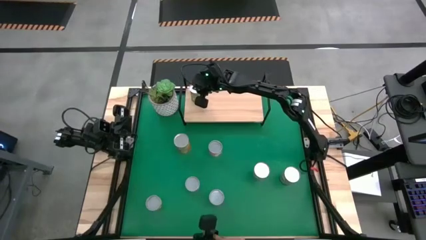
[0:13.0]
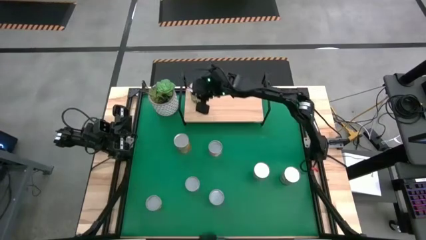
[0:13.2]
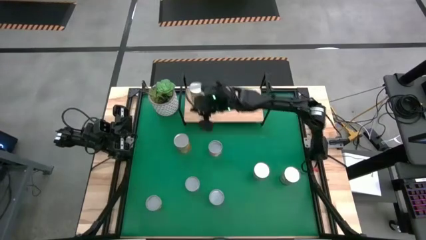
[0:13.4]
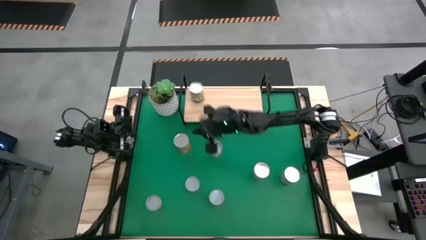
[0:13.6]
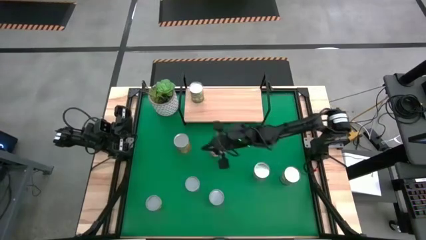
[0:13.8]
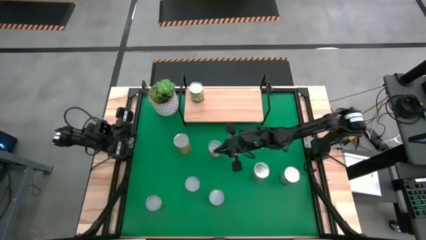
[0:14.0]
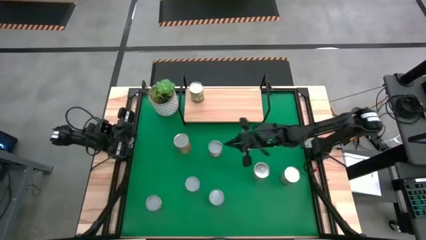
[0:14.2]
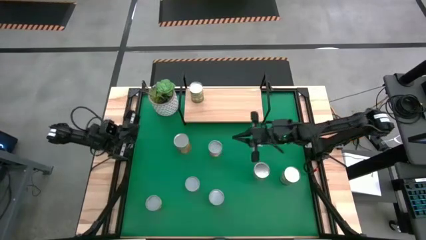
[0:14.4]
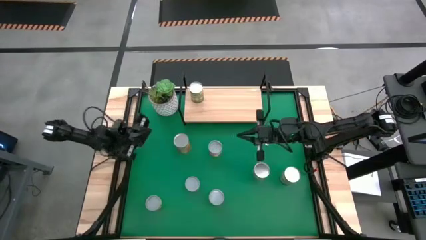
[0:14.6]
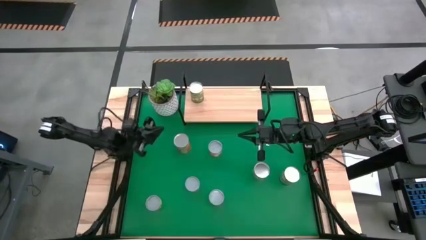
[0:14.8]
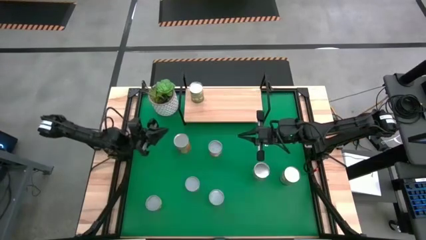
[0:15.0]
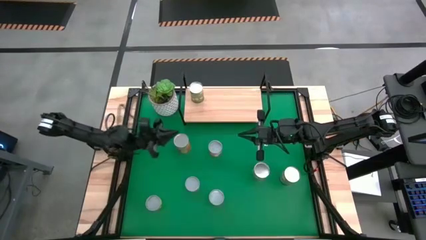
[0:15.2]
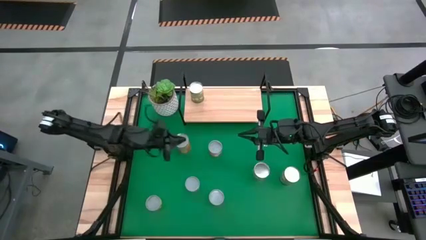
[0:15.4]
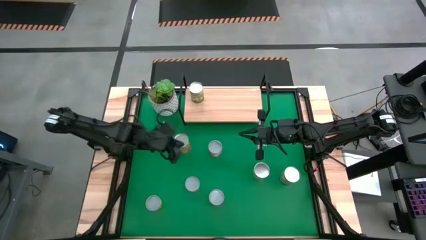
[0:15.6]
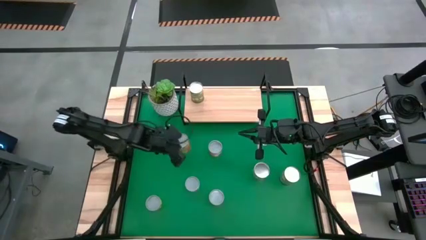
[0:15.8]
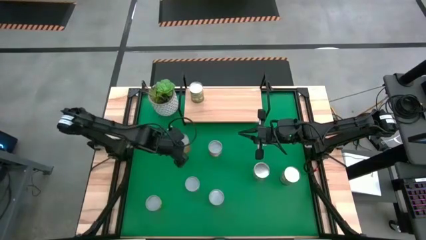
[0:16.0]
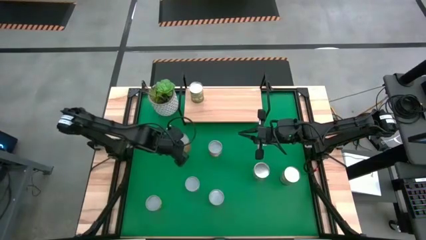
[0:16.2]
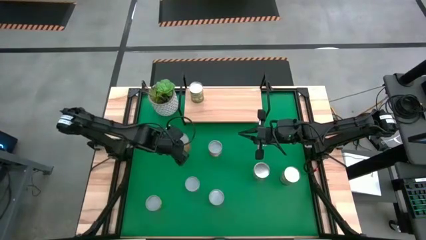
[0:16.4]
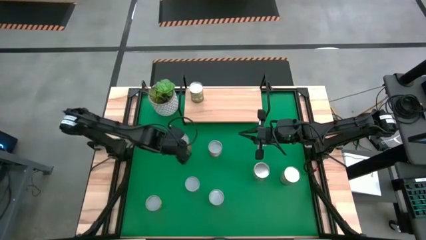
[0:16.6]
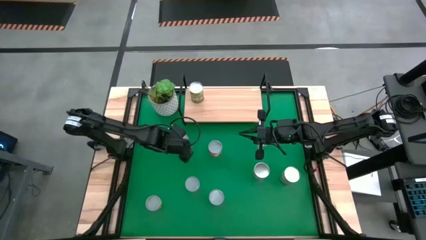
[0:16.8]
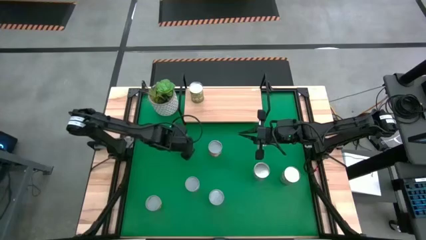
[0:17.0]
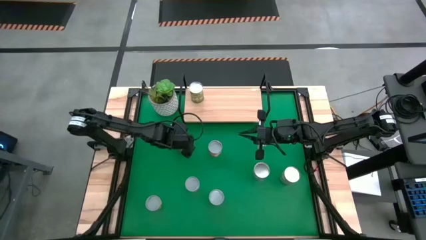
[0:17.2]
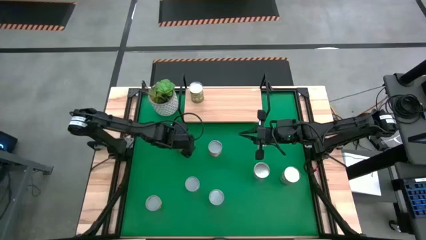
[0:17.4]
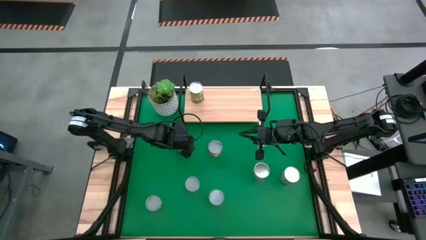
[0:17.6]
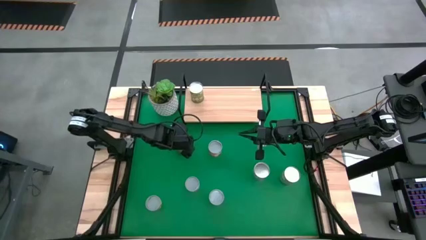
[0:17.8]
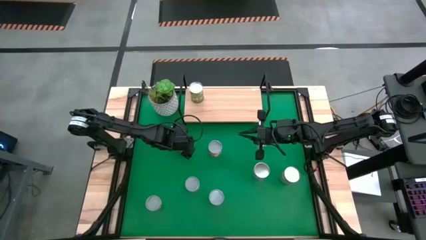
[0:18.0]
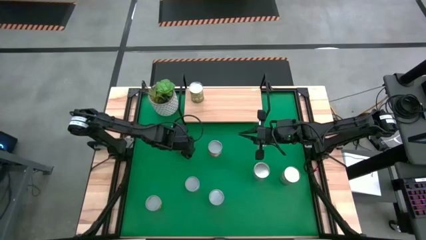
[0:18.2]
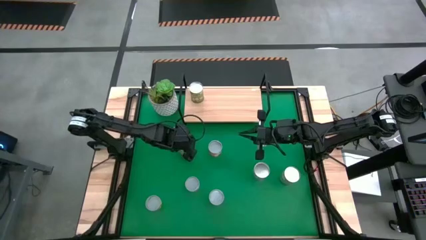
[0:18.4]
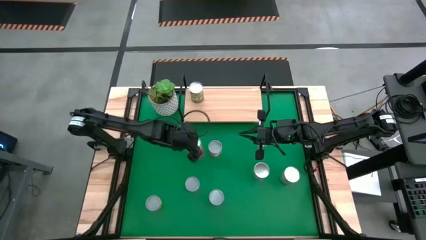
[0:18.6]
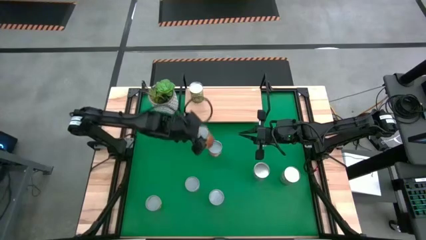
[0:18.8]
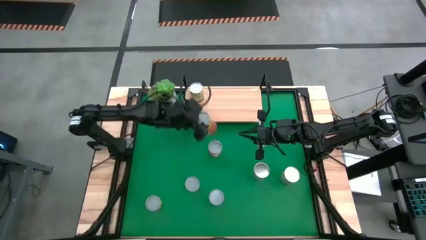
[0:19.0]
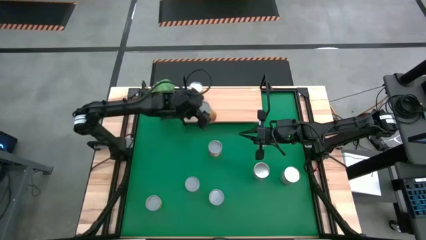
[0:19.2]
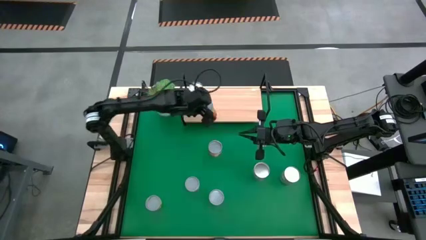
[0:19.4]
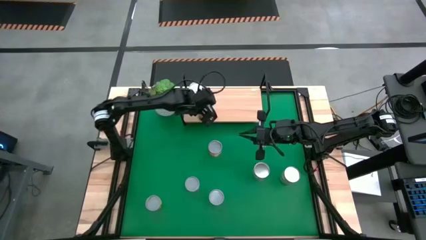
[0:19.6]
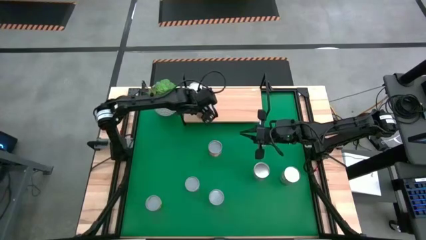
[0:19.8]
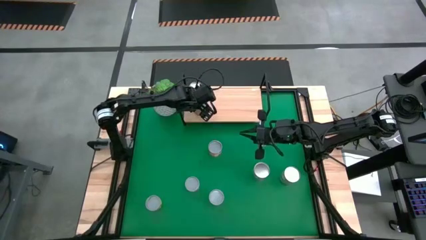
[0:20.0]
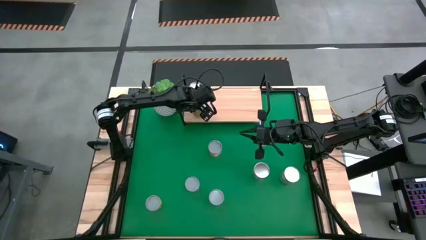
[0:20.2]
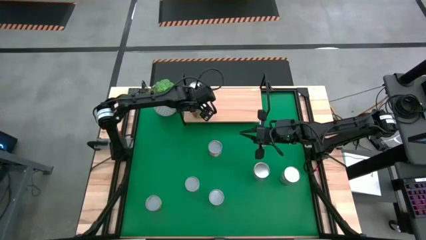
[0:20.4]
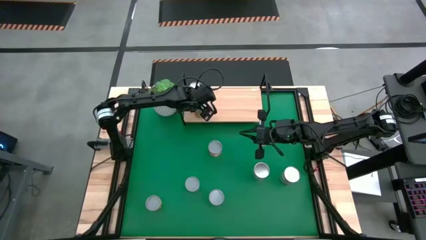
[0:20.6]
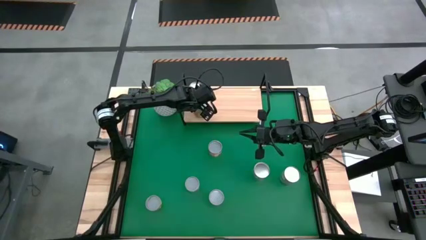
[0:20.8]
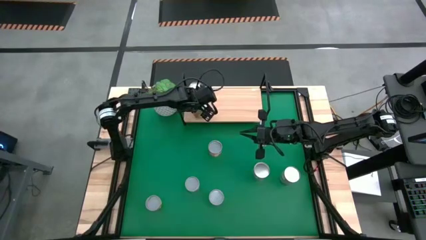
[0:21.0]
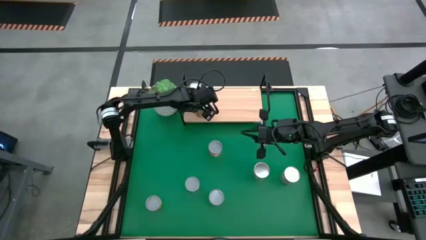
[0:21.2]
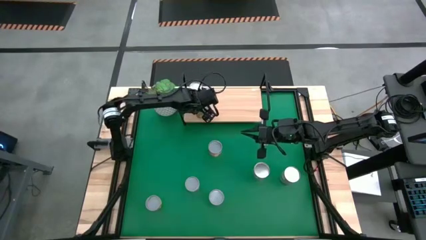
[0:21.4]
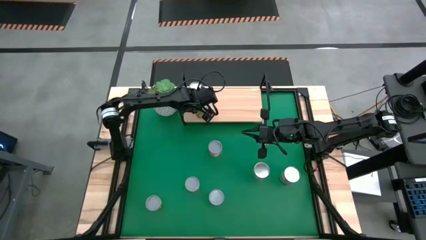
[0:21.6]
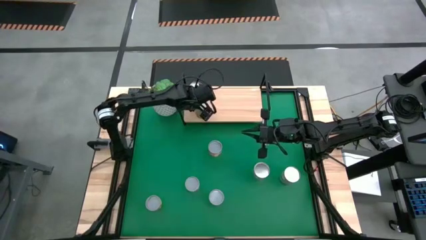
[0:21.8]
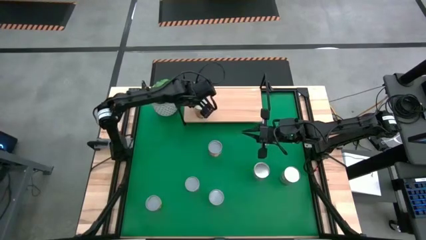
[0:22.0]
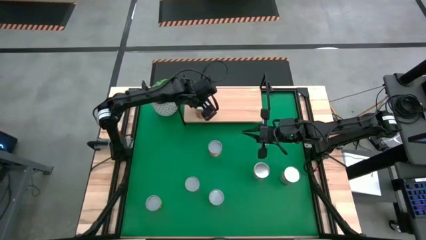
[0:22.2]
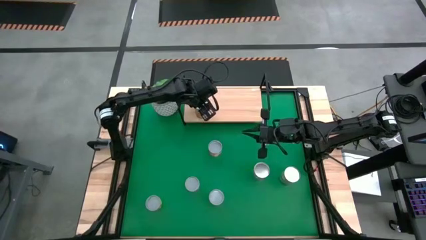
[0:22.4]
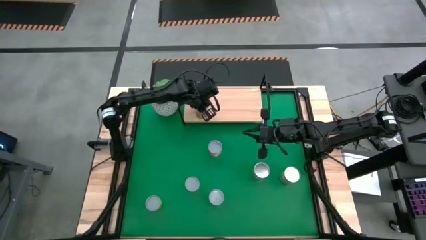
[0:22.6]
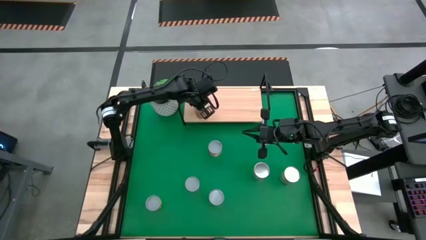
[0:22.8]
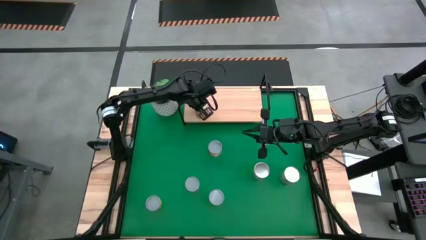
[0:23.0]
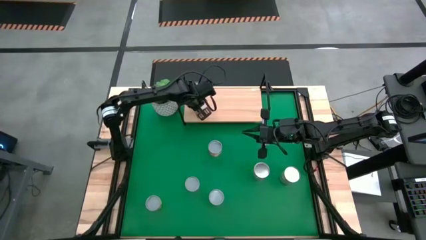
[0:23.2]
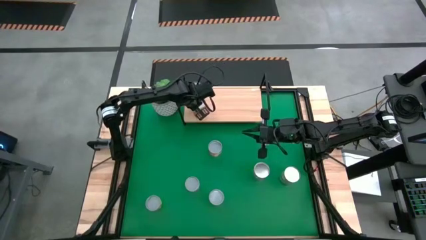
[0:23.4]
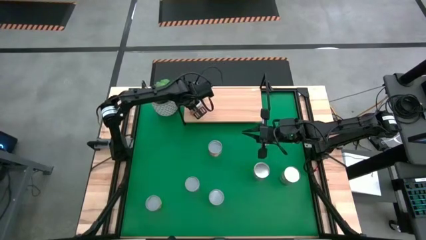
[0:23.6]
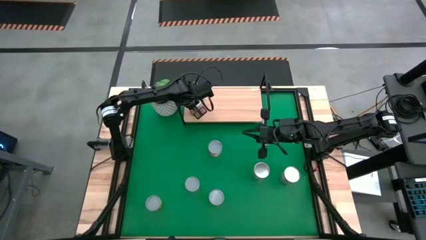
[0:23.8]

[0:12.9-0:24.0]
Task: Pick and place cans onto a shelf
Put the canned pineapple on the shelf

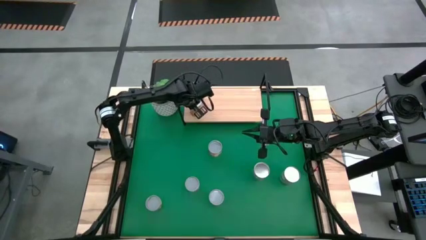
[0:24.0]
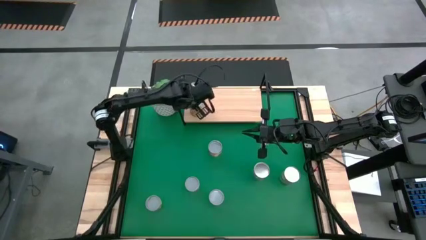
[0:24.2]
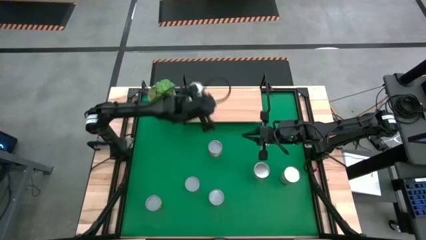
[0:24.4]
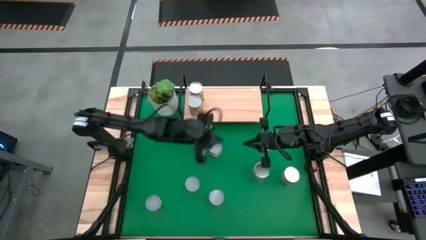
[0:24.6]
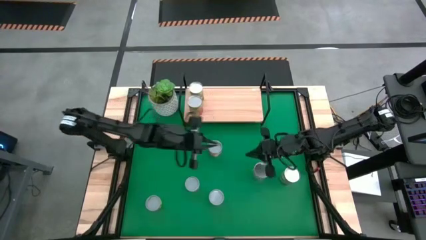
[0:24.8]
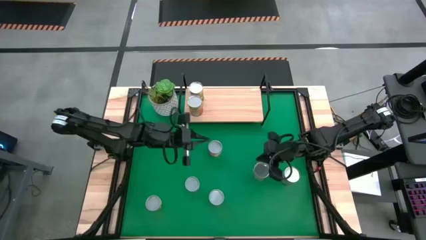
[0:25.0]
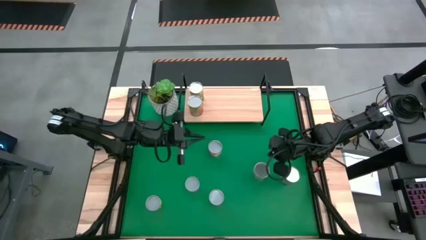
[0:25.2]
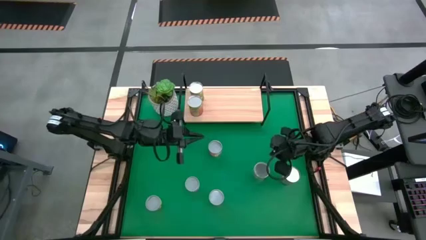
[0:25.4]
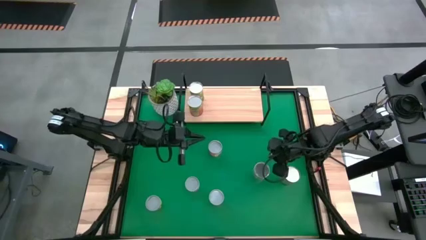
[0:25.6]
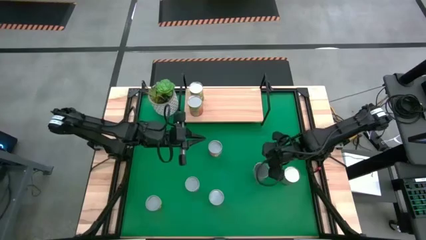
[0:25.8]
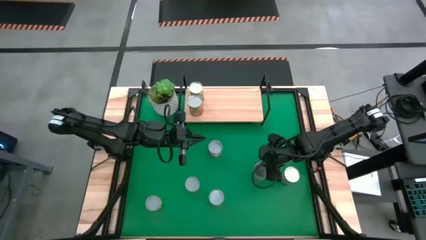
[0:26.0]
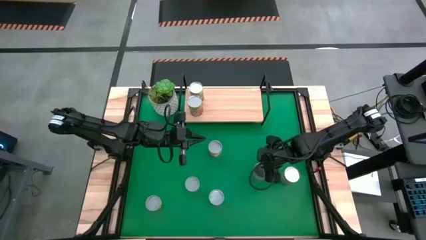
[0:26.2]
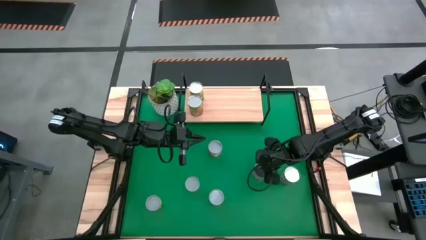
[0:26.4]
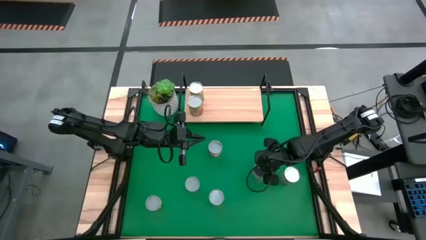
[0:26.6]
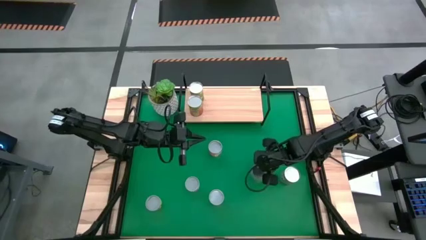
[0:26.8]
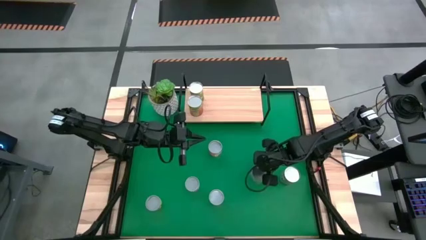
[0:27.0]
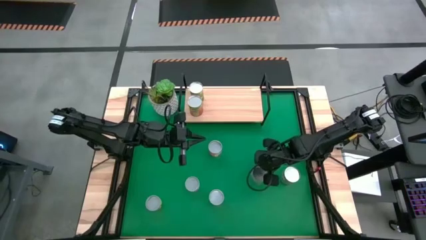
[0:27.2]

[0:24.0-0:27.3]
Put the canned cherries on the shelf
